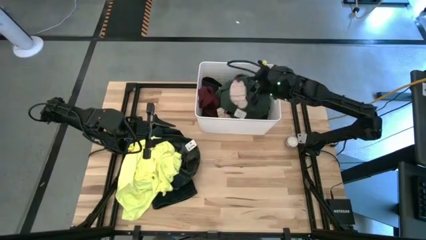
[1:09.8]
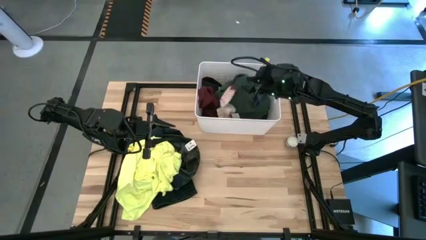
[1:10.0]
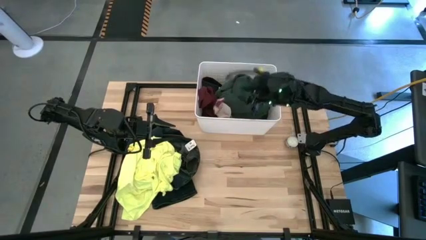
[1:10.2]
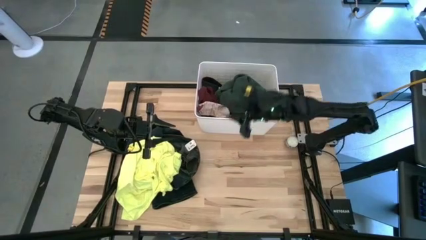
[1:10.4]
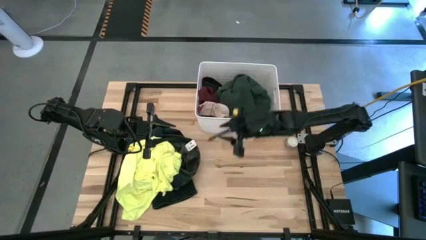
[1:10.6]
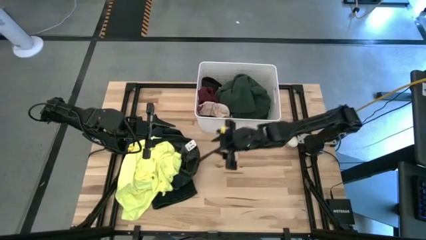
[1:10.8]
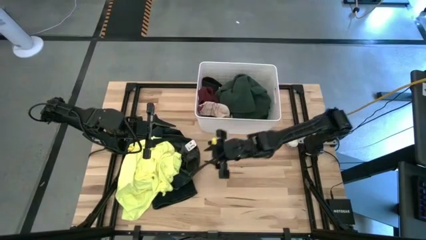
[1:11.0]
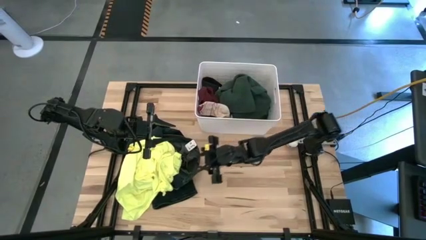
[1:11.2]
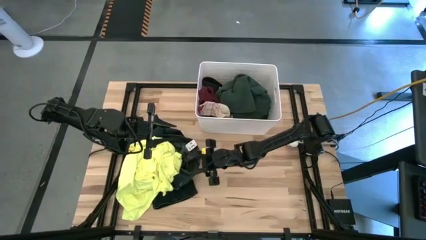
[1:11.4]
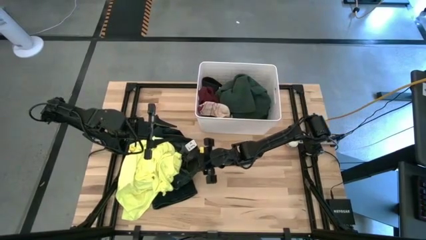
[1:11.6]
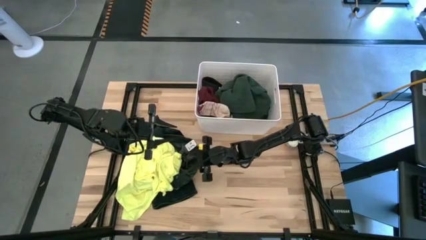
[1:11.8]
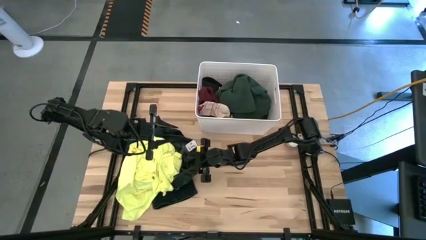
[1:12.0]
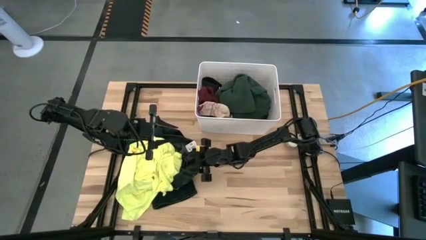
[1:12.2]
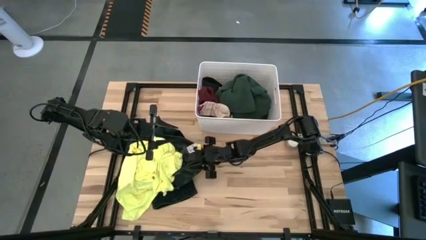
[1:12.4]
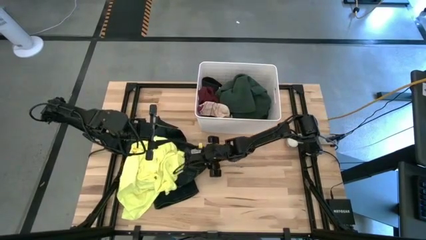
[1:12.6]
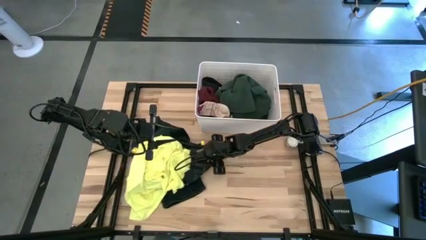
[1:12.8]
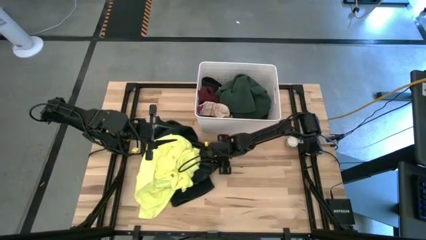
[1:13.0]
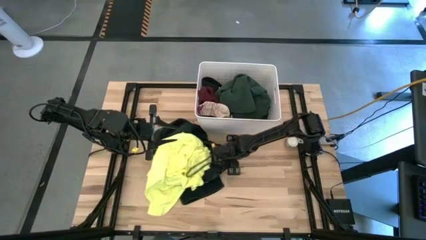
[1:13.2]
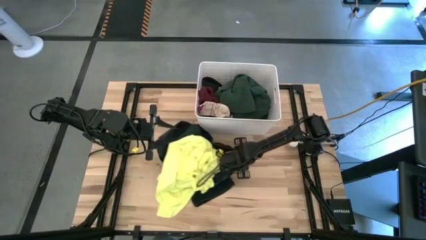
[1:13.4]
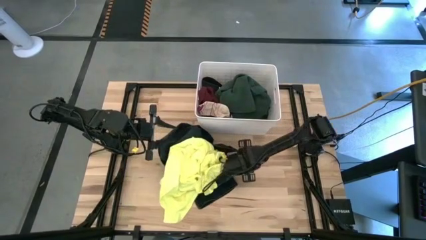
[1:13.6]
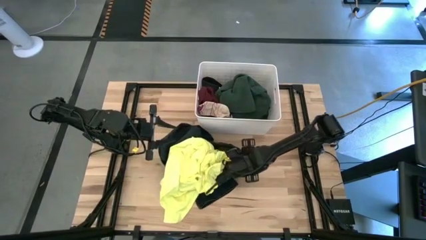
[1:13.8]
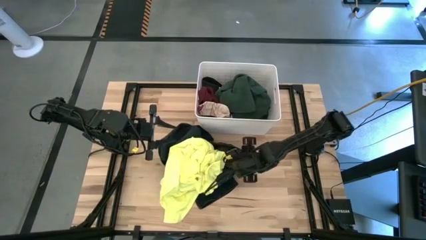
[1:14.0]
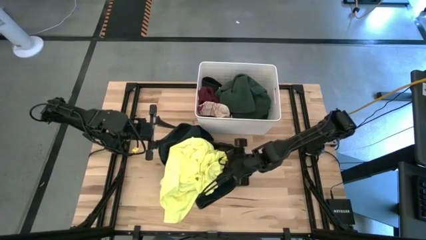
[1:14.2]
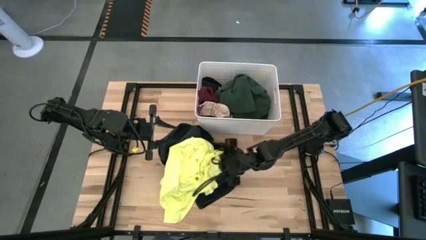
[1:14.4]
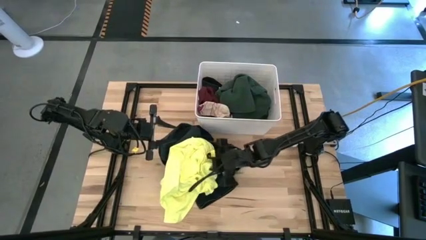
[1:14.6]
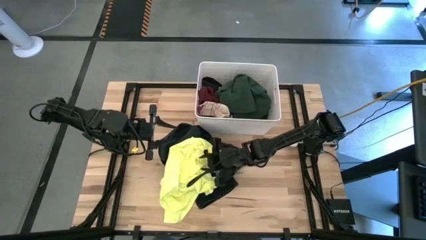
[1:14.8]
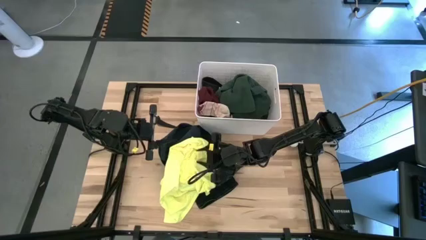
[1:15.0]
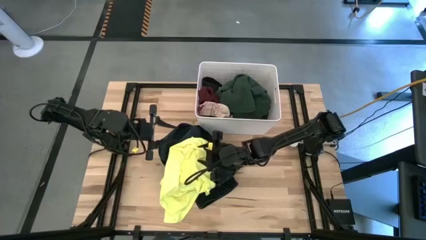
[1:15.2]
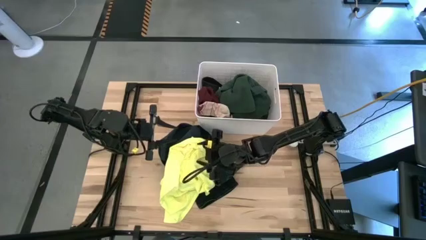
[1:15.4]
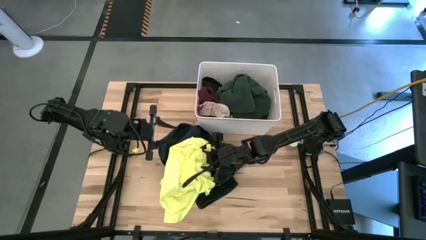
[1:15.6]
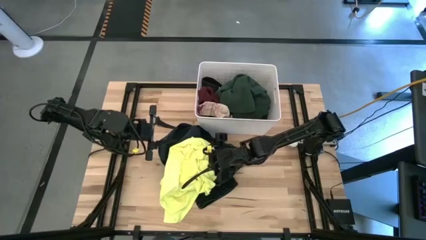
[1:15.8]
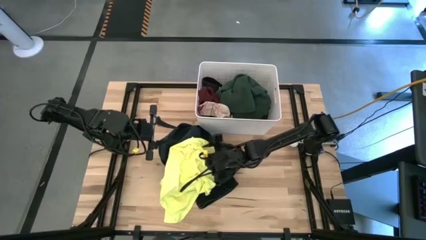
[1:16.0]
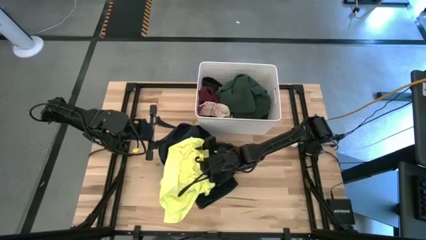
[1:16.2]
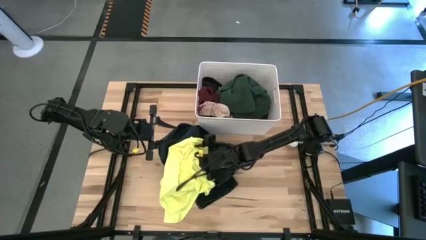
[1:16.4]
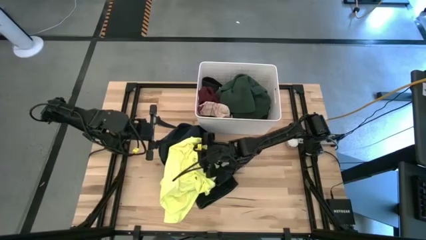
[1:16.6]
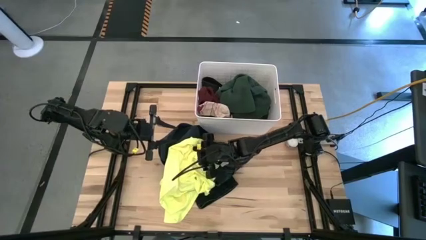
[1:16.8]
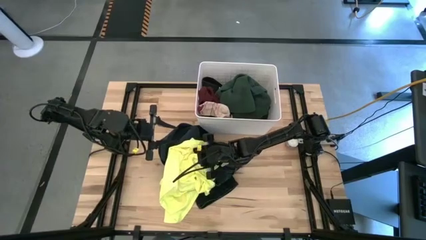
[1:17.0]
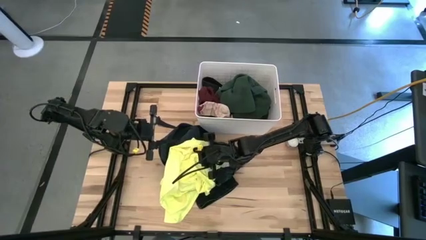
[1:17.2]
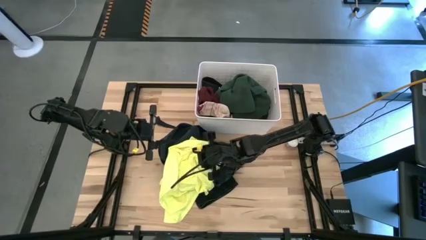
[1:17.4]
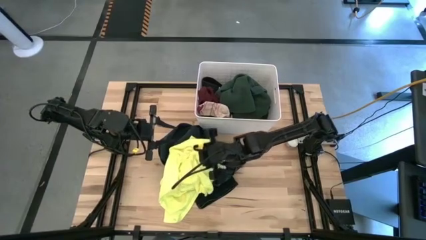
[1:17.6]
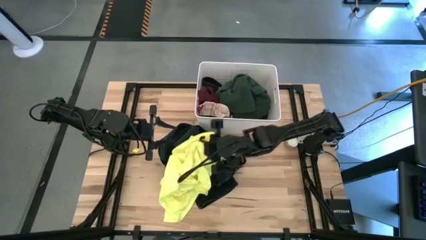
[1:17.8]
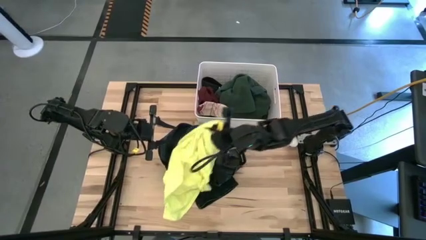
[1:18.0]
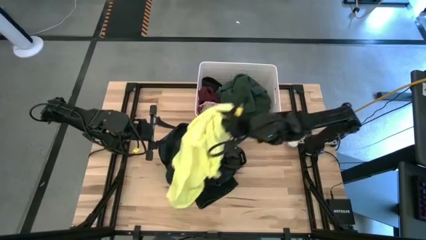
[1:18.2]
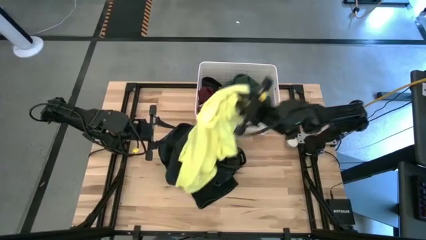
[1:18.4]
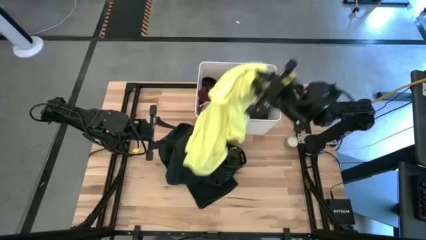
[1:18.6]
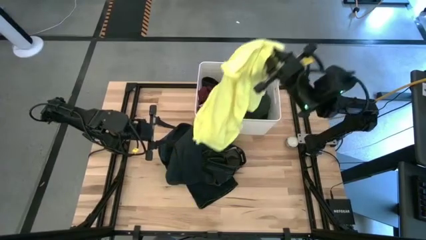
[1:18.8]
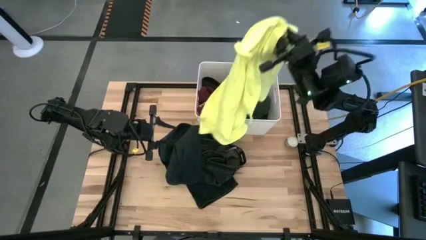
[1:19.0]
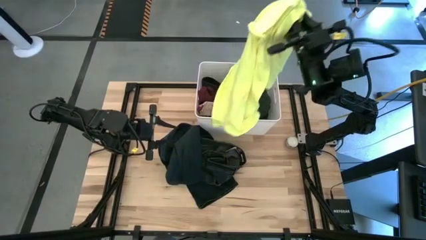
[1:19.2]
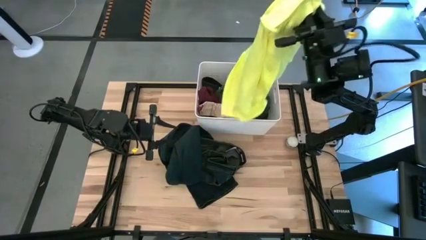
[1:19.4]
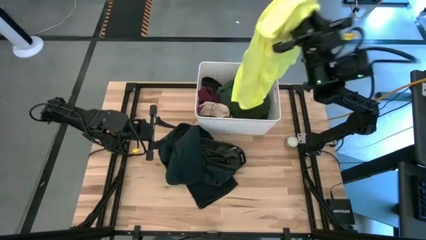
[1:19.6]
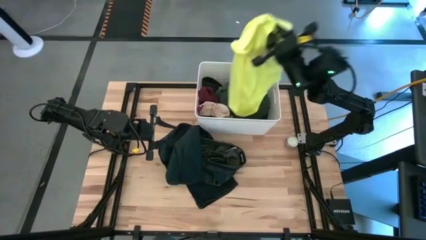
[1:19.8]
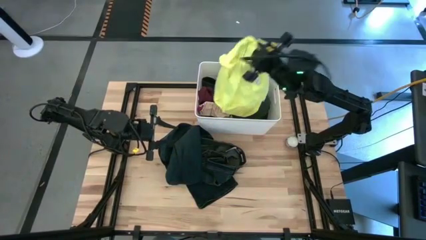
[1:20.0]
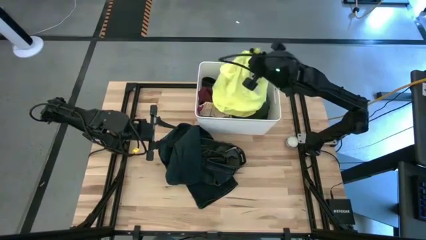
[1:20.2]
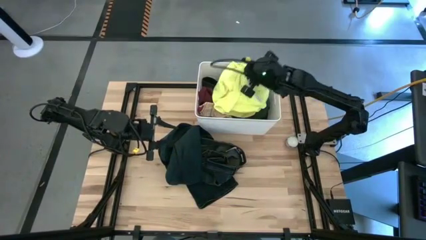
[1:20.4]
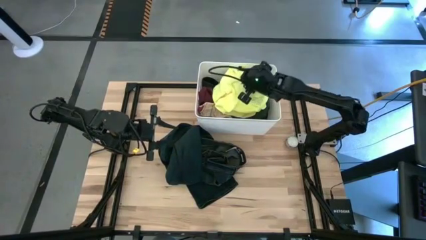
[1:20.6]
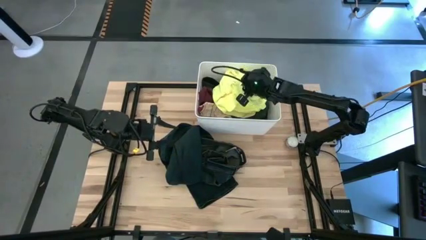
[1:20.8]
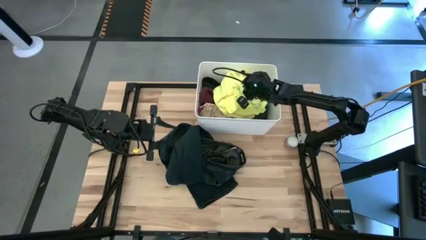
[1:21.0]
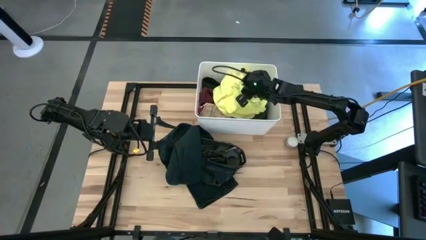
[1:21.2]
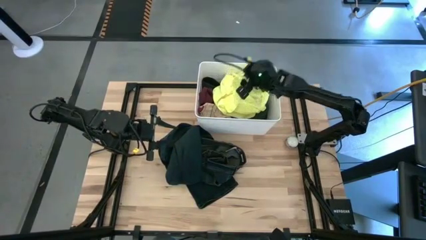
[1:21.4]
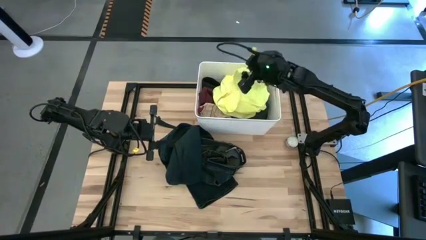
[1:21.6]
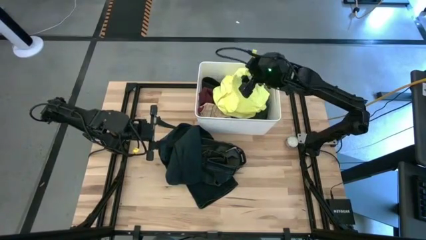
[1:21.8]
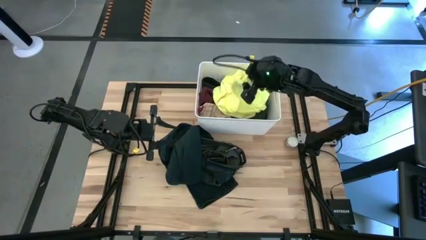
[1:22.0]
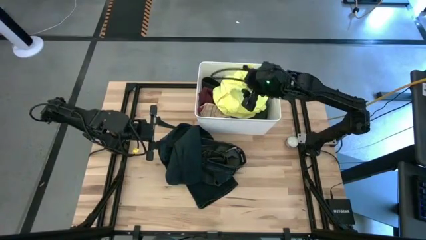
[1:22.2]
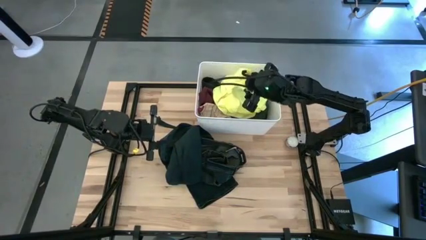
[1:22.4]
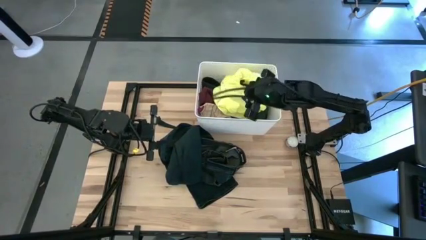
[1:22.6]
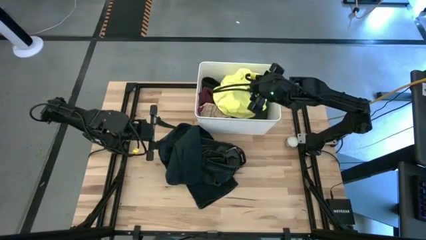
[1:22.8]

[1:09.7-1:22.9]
Task: Sort clothes
Put the yellow shirt into the white laundry organizer

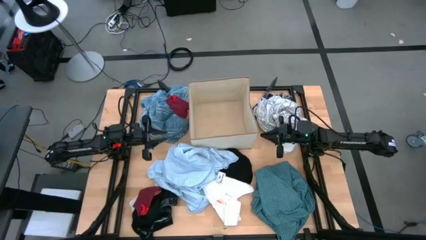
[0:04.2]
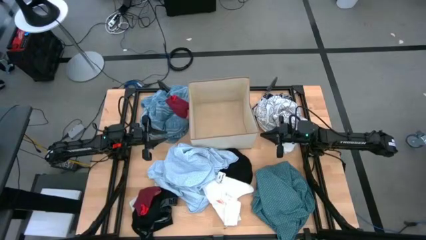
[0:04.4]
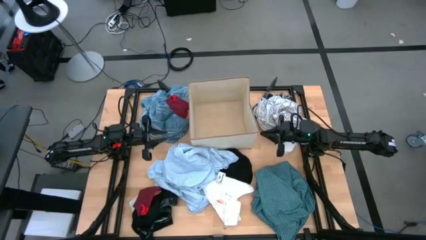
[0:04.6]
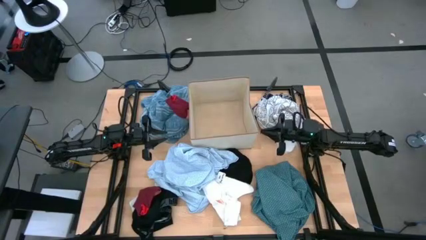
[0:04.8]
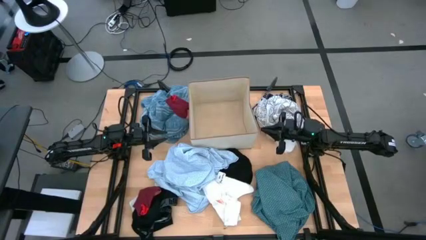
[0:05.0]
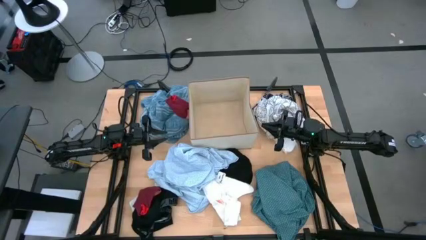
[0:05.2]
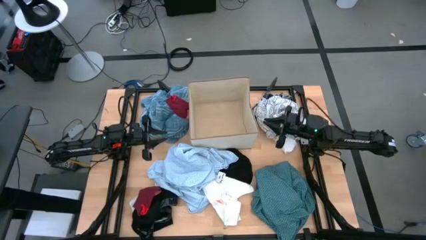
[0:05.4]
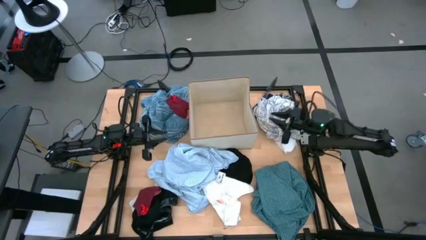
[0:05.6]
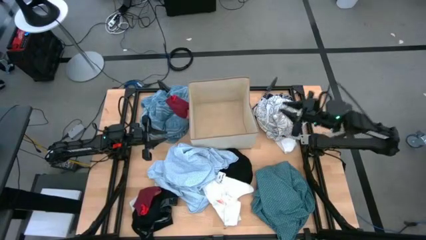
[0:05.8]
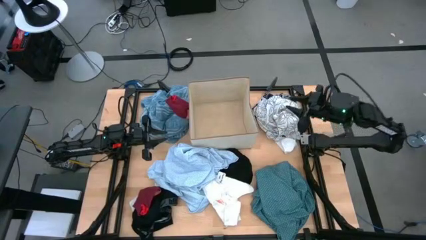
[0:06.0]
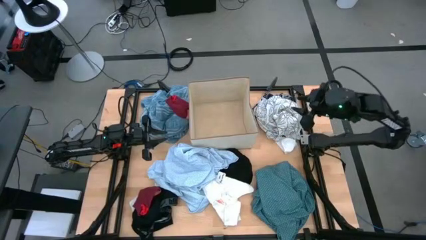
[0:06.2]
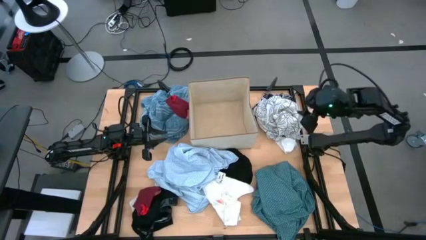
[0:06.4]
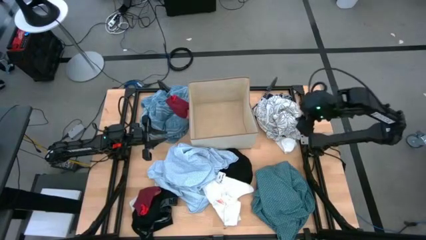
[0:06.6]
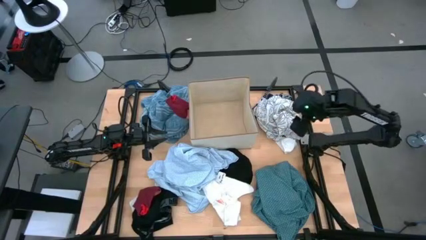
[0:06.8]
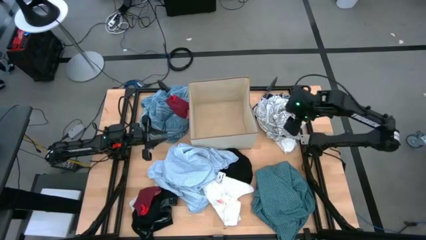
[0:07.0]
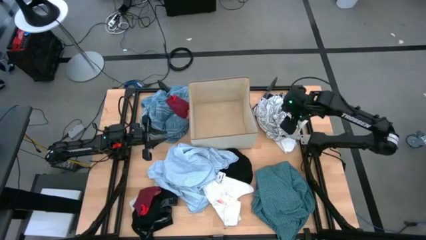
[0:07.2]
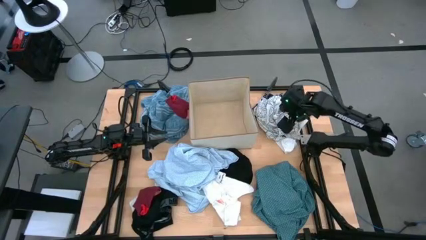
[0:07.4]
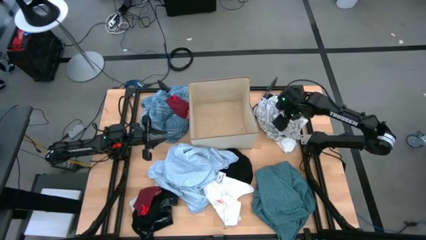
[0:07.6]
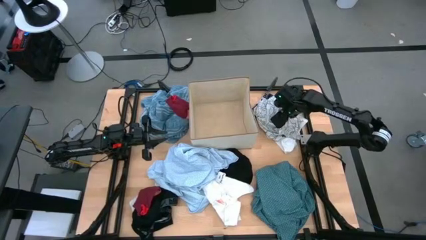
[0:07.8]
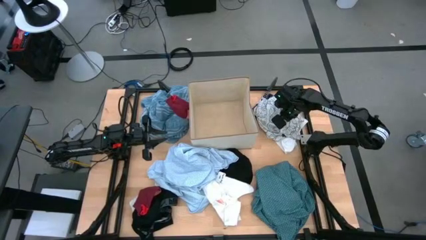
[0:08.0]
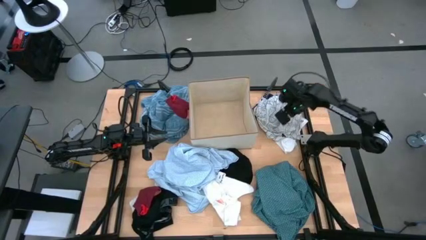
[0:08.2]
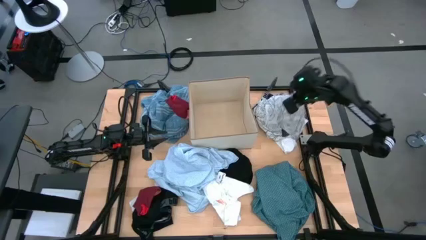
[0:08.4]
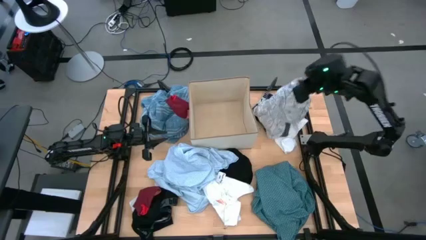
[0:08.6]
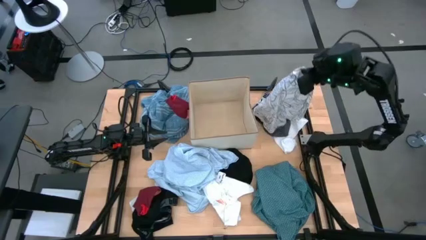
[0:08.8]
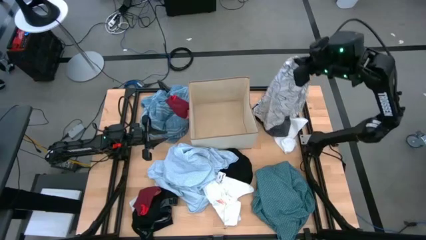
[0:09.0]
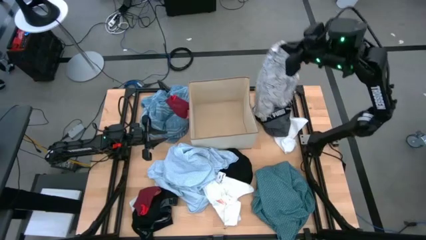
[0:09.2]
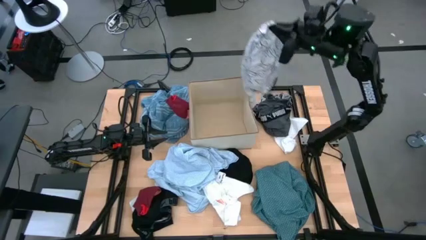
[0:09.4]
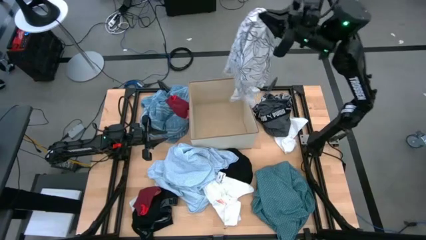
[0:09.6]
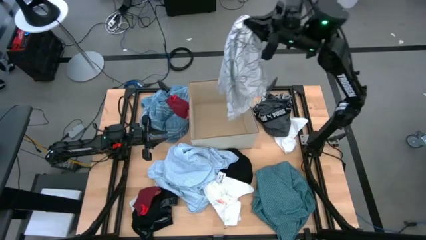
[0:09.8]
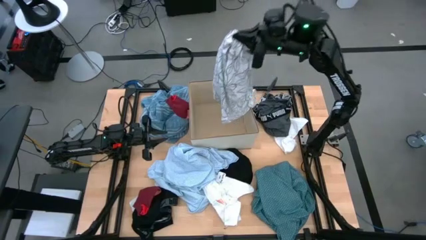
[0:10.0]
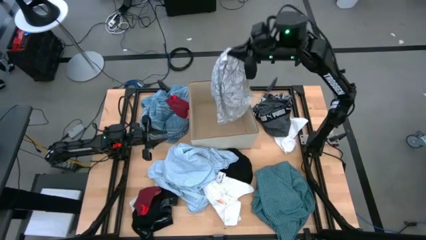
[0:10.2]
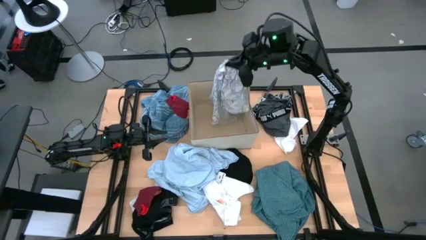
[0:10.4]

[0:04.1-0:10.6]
Task: Sort clothes
Put the white patterned shirt into the bin
